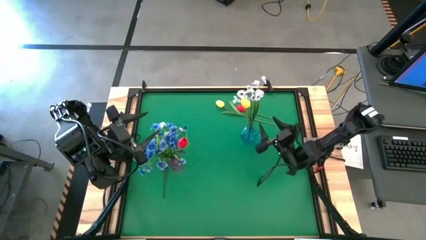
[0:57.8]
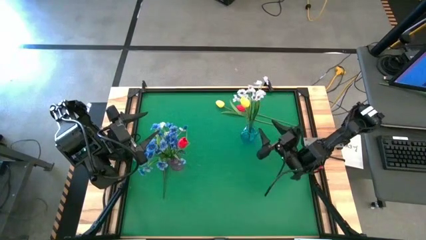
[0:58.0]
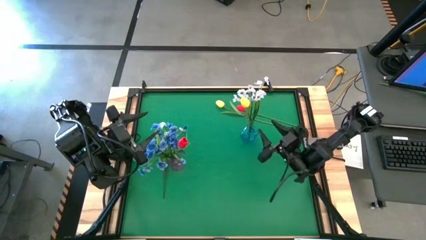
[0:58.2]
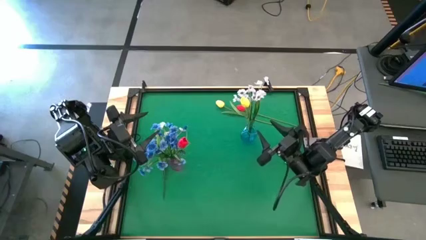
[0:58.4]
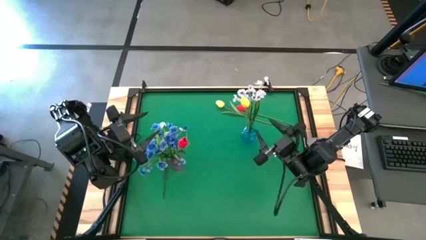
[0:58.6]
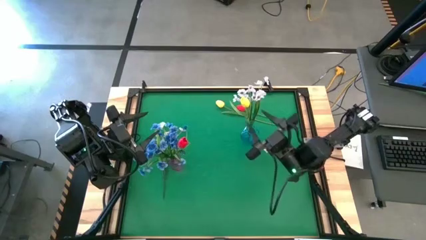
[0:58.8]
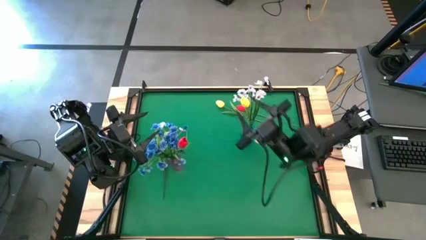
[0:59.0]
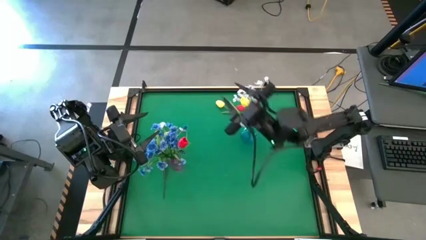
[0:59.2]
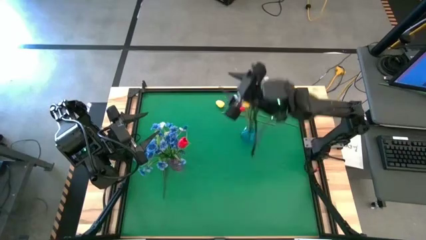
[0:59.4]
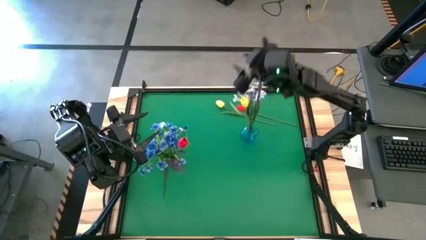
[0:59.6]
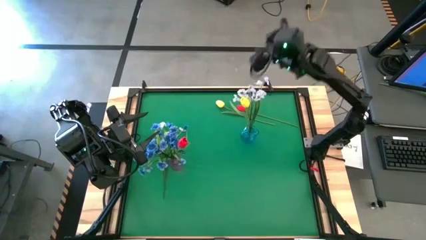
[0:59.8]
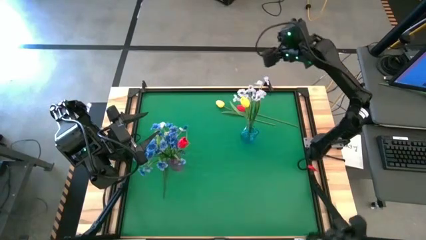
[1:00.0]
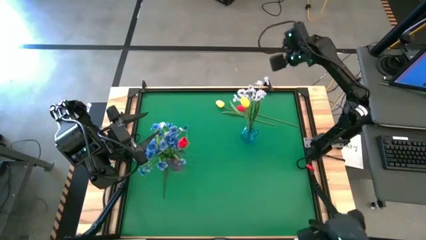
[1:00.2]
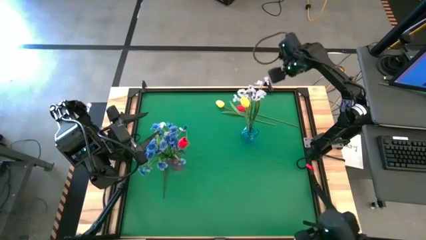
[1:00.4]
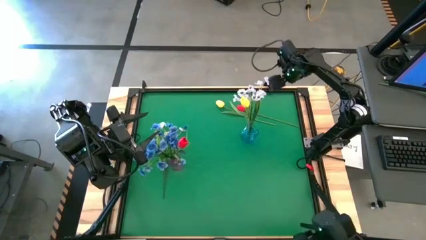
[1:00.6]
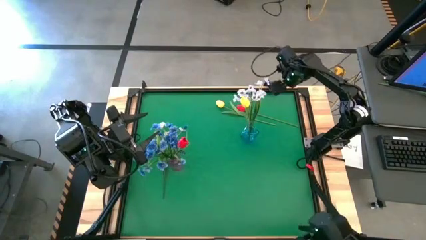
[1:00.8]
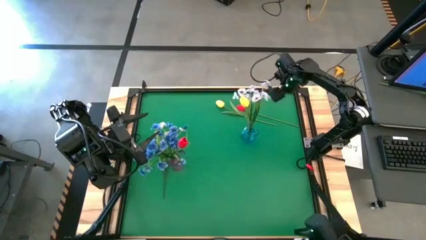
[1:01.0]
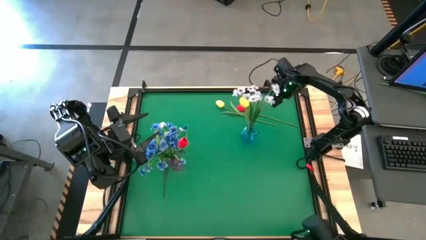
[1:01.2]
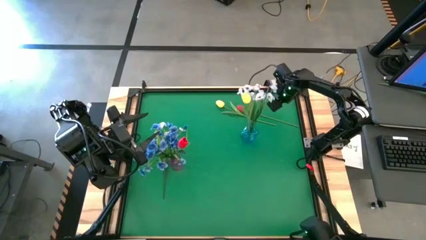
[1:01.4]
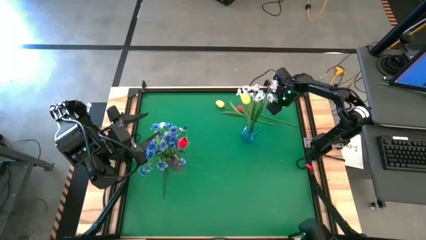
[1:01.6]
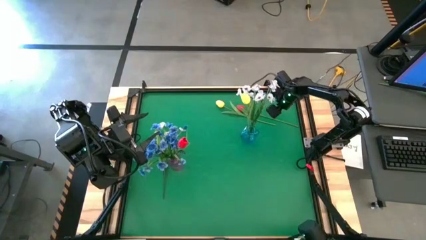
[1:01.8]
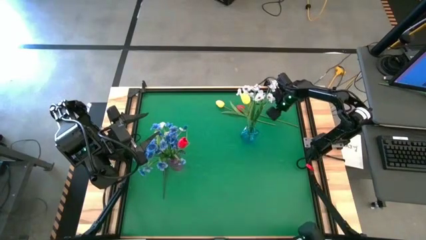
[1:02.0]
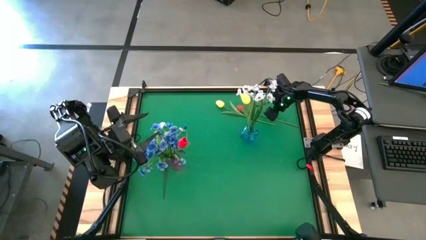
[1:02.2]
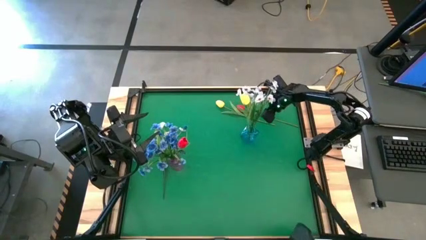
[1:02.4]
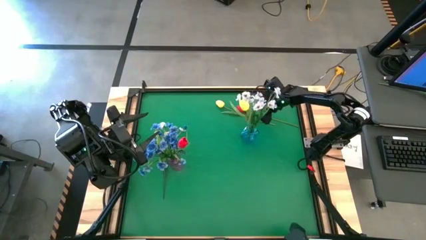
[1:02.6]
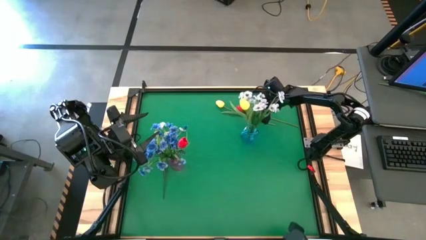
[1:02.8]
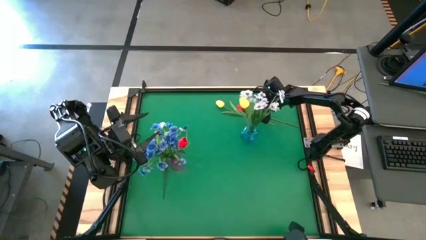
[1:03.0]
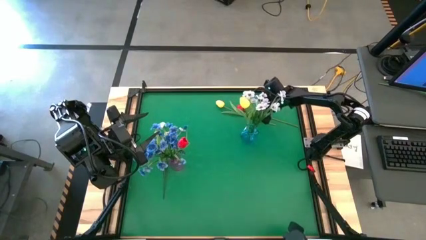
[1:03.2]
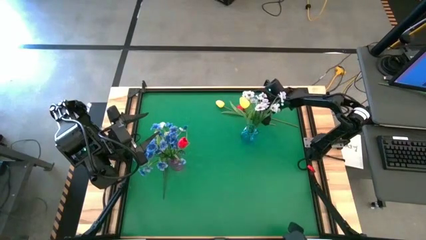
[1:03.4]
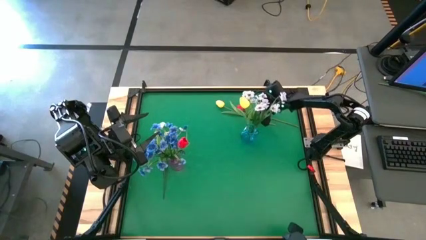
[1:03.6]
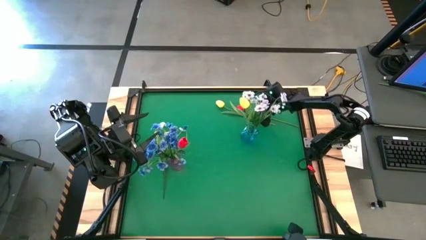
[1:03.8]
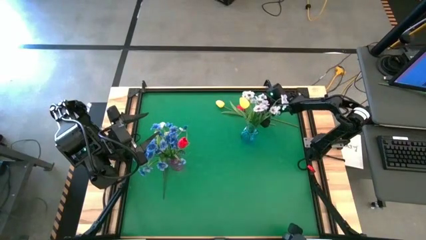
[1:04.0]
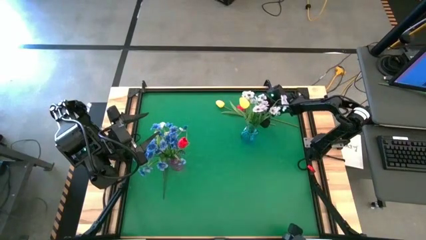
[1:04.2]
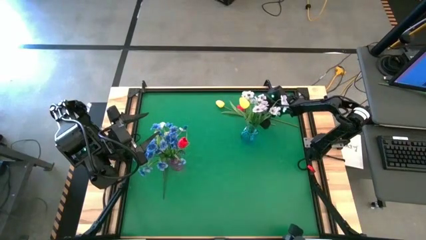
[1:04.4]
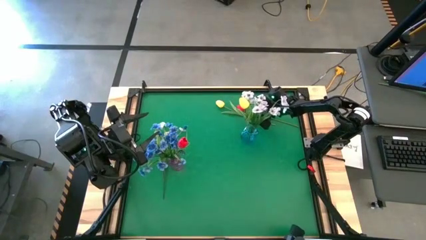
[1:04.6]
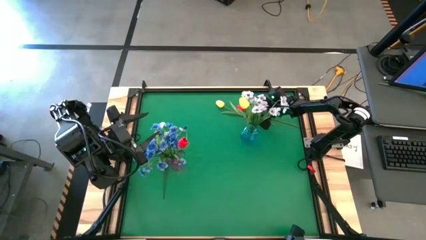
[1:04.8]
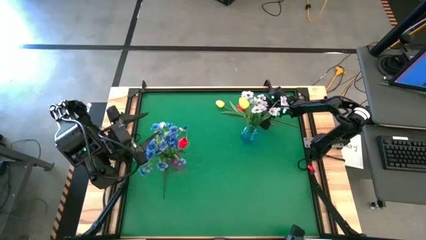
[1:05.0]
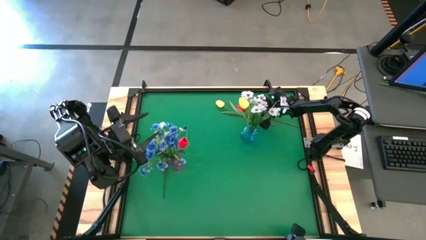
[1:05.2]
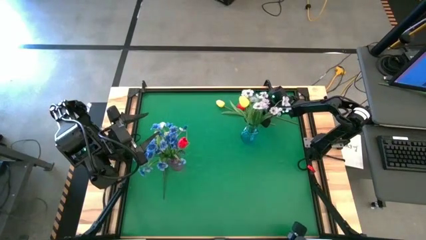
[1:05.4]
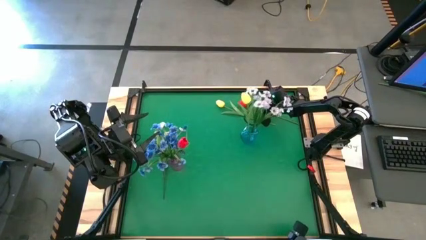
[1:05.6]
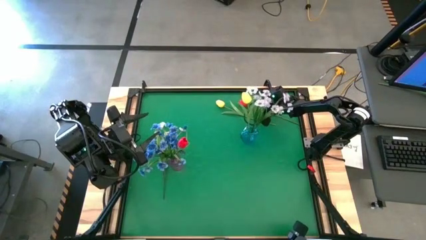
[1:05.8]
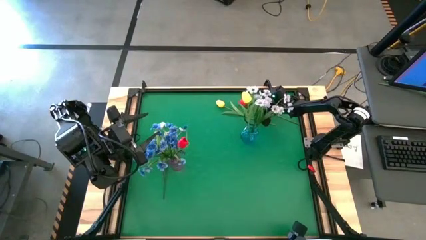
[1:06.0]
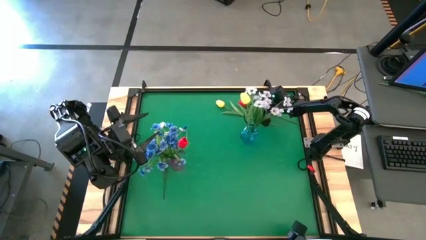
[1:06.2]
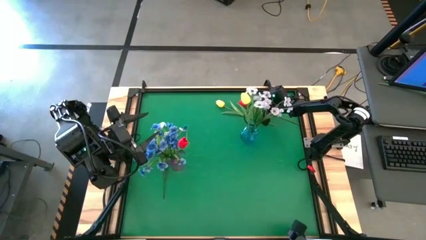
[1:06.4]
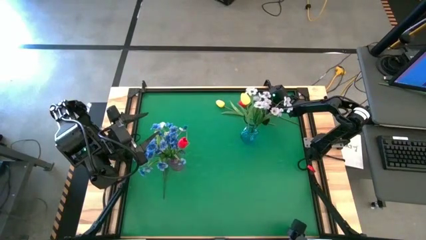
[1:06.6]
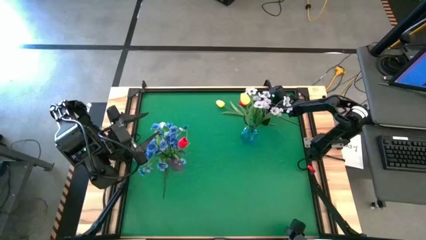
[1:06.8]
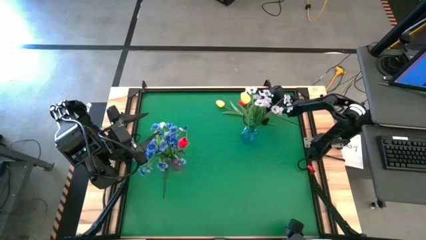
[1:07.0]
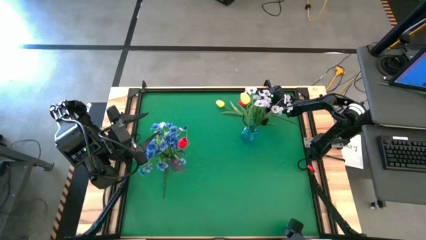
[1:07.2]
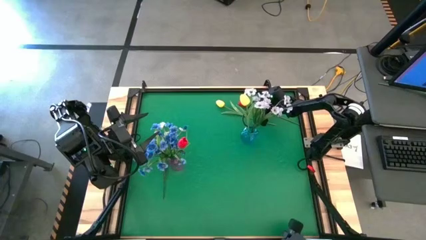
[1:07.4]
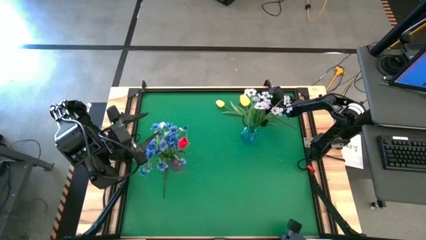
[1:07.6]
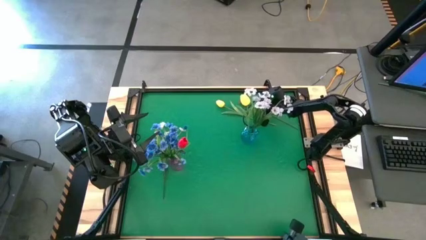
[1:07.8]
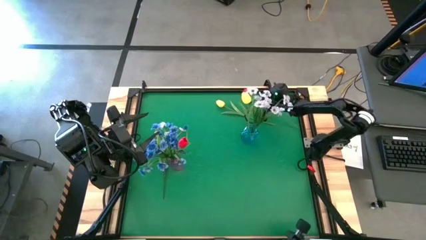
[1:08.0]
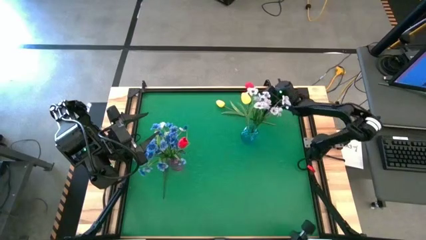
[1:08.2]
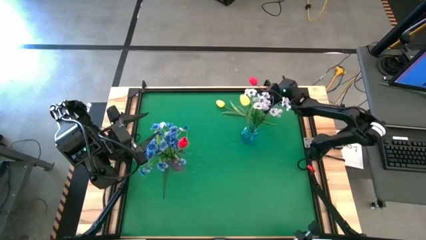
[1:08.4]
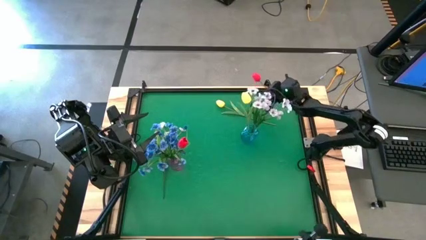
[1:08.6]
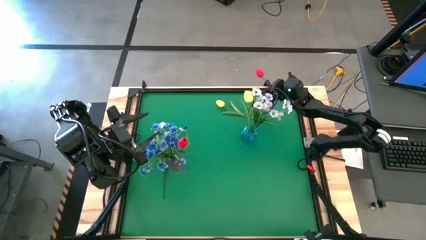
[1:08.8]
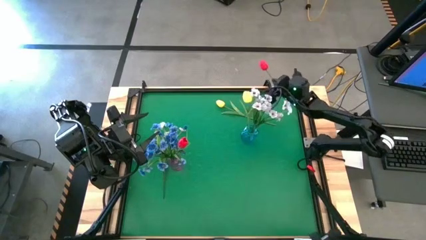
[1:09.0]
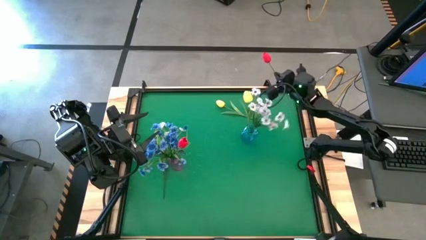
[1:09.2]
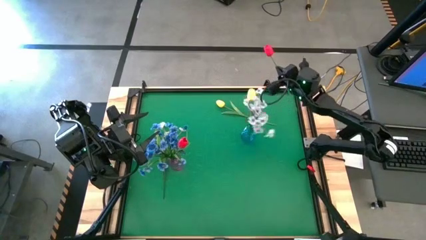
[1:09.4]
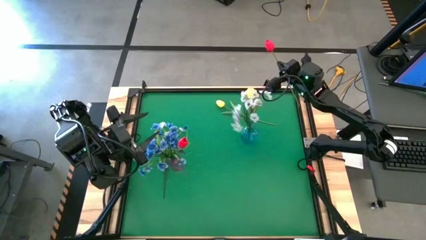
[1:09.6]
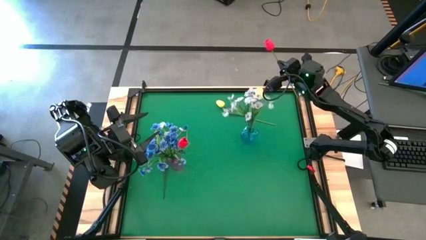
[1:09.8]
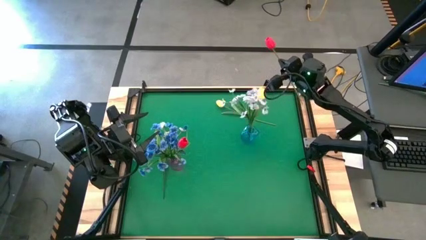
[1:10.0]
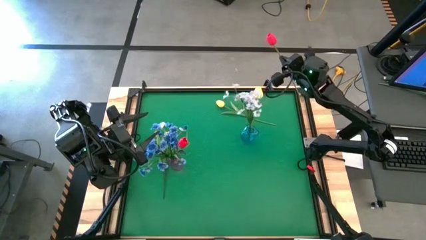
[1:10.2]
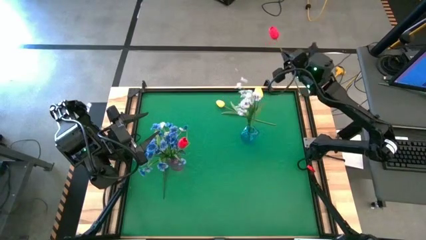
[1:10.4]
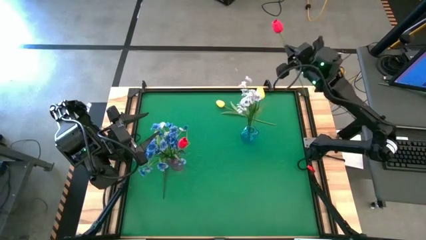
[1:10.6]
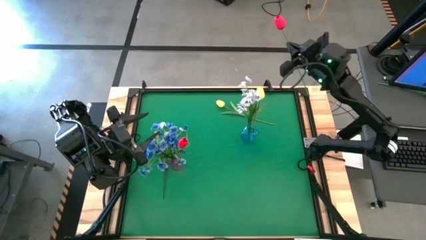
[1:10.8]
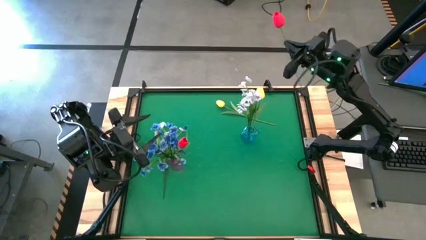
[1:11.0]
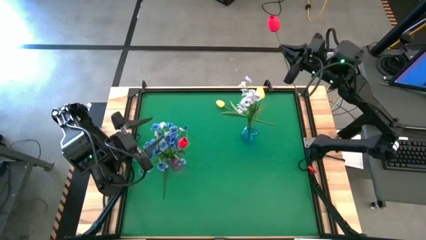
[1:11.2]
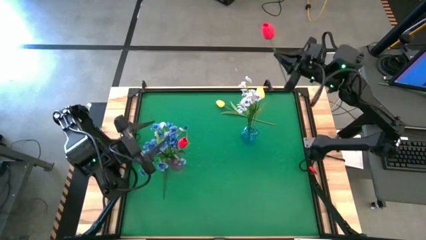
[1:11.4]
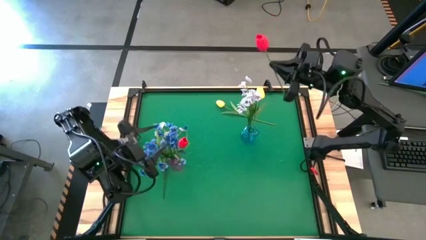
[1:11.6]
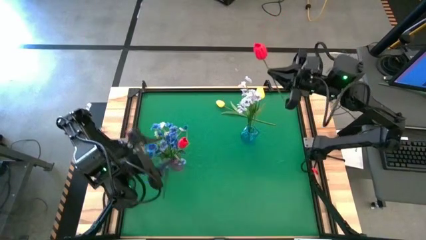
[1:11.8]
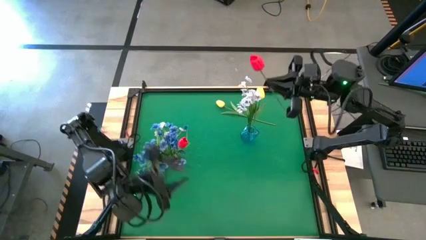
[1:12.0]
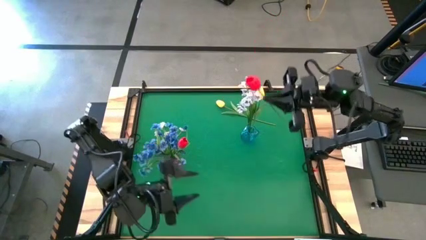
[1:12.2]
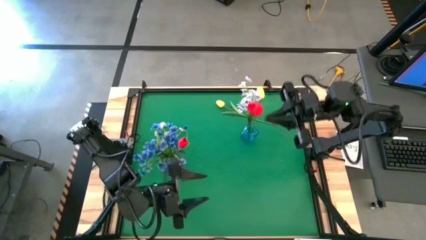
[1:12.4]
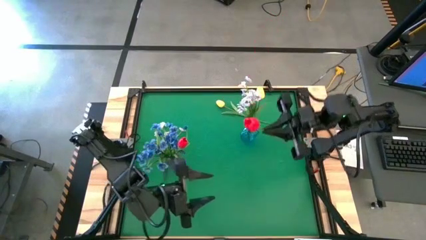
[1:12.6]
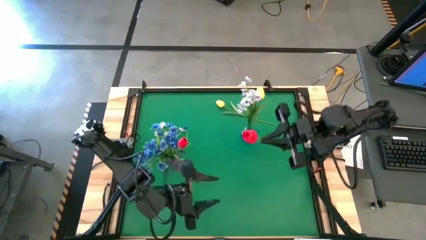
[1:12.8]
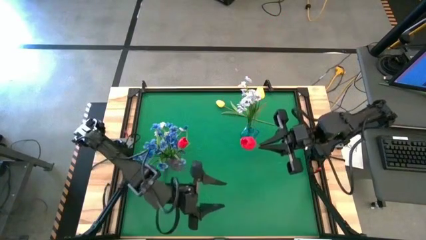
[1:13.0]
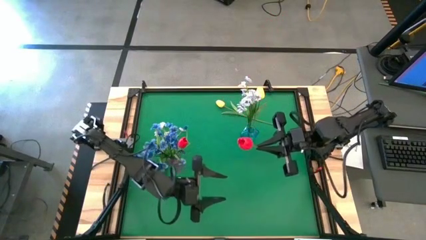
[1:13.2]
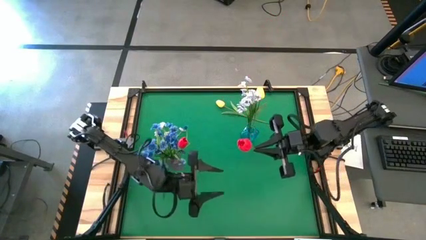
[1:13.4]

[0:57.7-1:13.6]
Task: Sort flowers into vase by color
Put the red tulip into the violet vase
